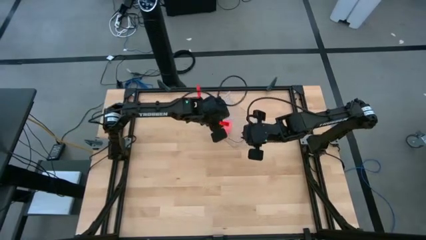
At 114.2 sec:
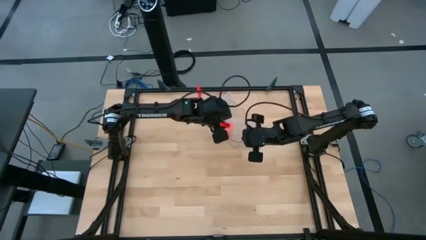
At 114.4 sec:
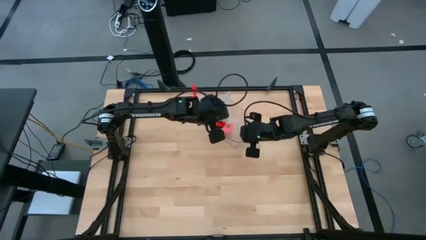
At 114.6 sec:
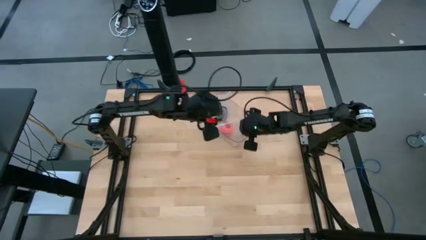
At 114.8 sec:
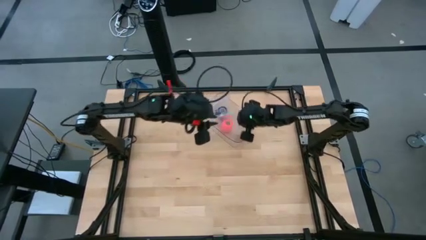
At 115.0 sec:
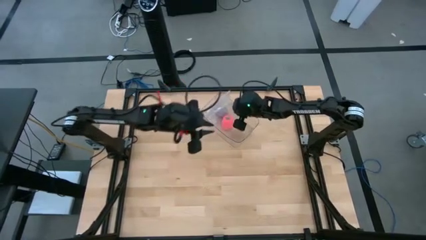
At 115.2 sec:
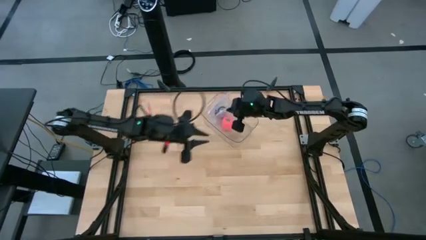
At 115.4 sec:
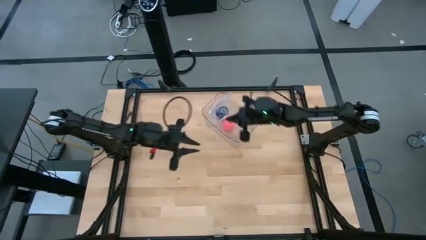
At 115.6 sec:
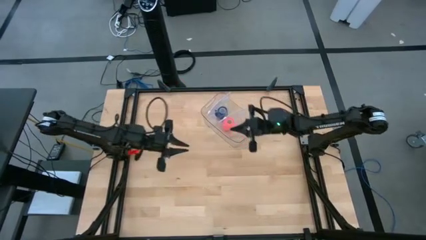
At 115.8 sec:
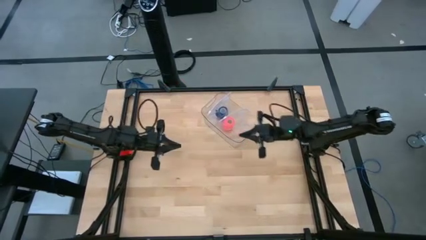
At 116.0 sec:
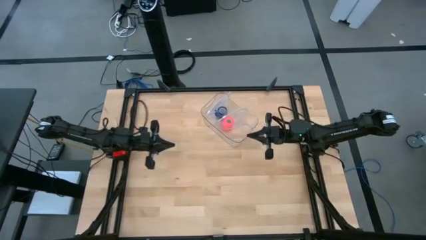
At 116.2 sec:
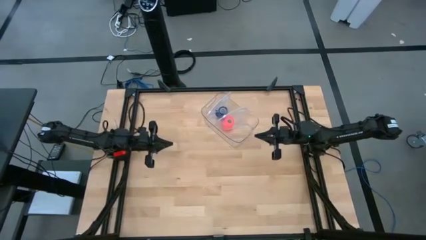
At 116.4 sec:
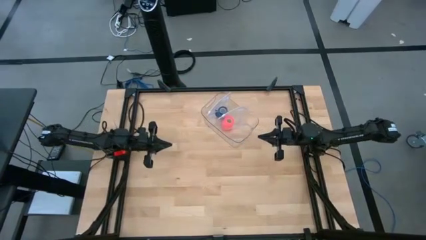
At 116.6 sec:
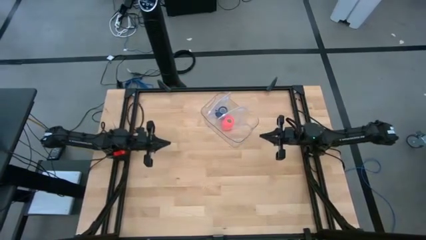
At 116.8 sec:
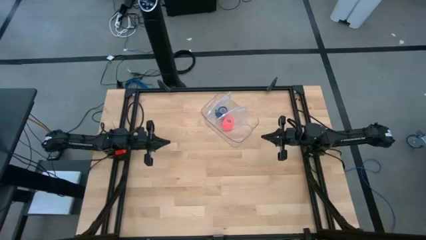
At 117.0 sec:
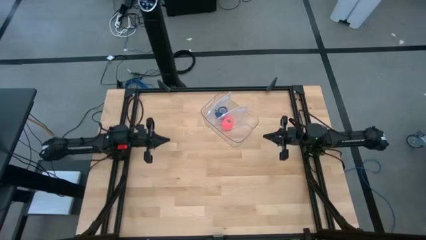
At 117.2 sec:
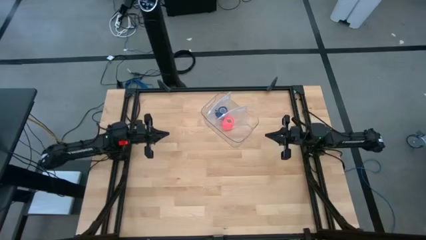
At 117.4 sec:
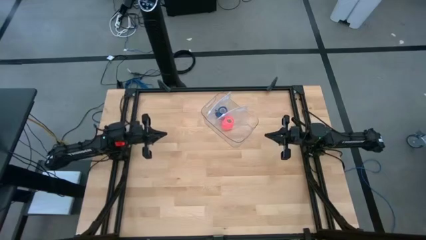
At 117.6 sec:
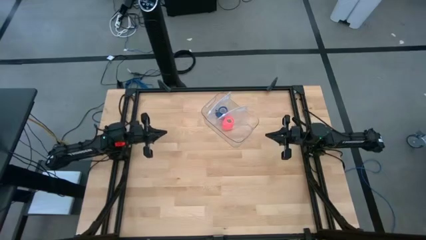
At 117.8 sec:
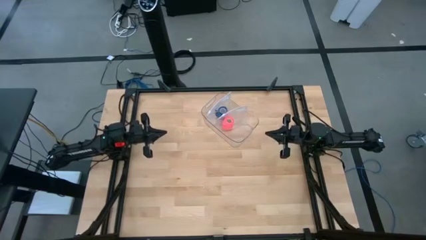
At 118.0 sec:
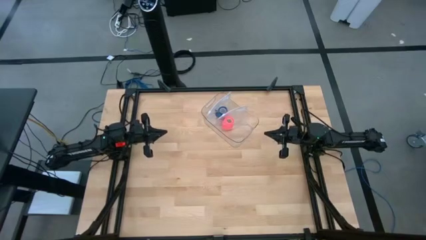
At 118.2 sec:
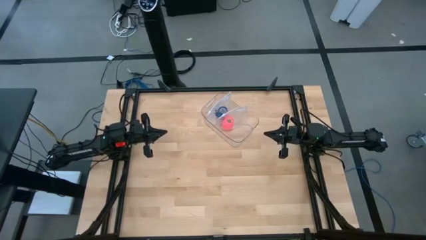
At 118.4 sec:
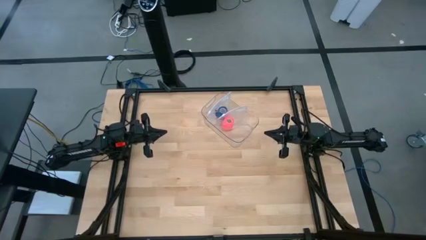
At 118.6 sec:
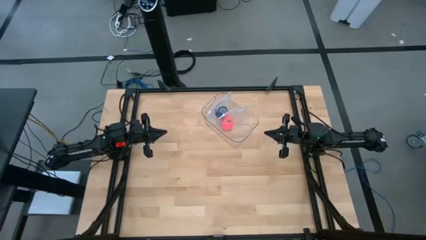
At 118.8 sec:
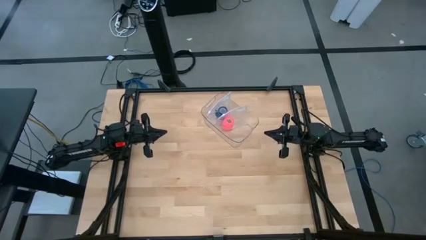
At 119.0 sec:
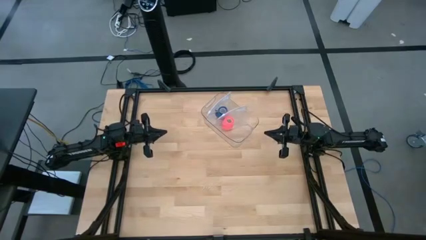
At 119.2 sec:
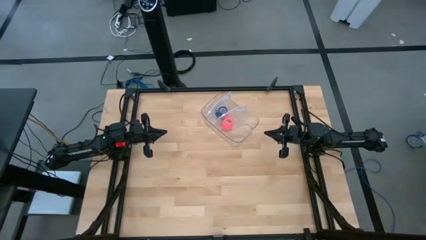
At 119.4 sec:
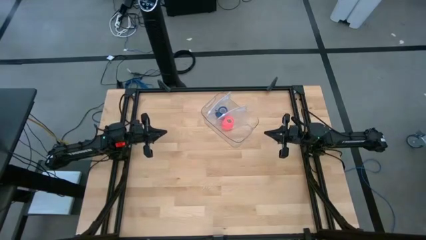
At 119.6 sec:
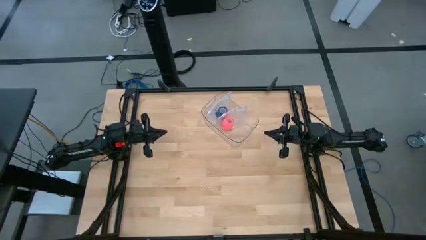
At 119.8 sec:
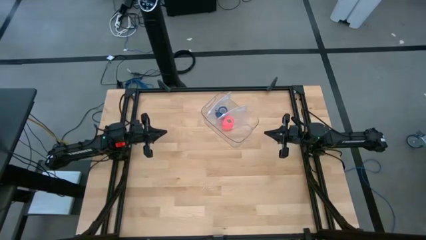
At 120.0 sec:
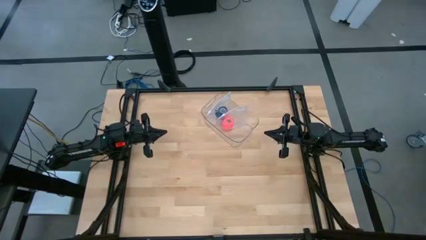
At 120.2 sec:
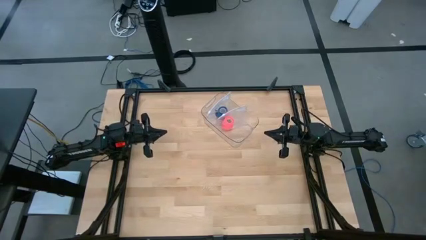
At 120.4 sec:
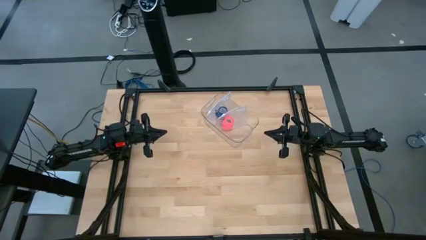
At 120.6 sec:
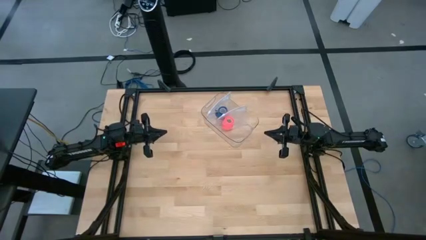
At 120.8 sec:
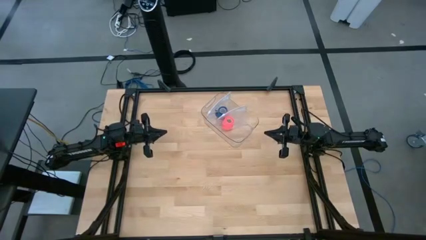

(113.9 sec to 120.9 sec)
Task: Roll bandage
Return to Home Position

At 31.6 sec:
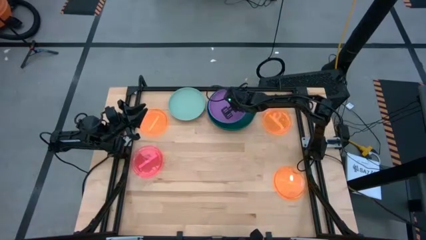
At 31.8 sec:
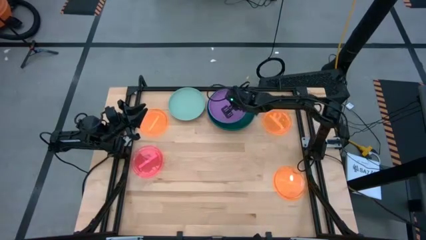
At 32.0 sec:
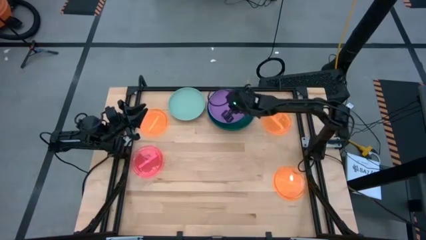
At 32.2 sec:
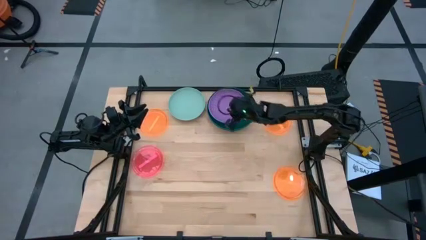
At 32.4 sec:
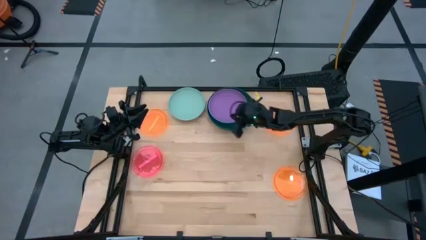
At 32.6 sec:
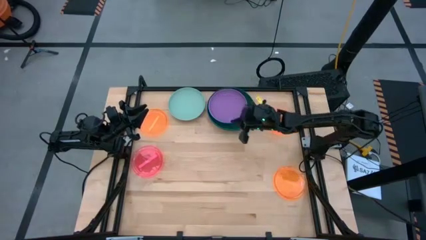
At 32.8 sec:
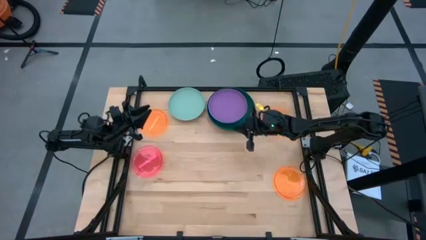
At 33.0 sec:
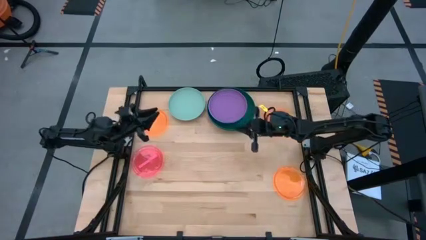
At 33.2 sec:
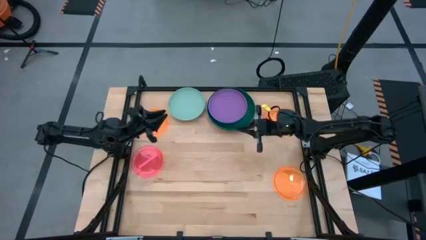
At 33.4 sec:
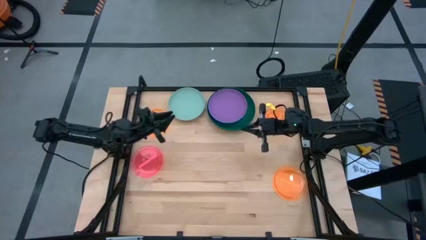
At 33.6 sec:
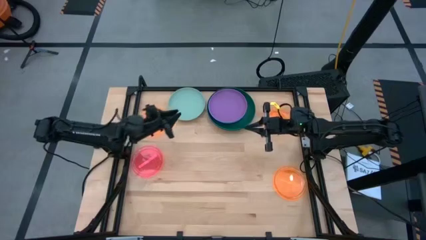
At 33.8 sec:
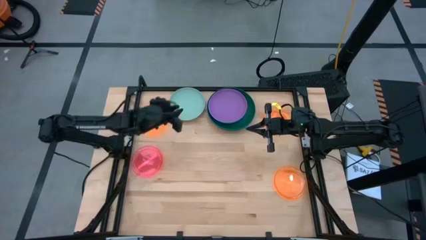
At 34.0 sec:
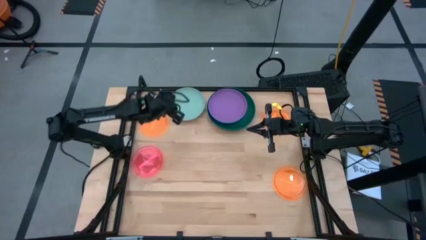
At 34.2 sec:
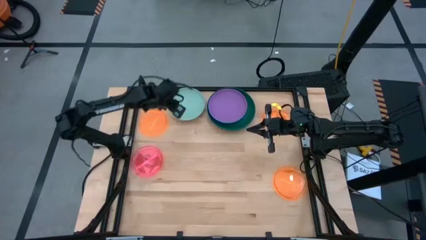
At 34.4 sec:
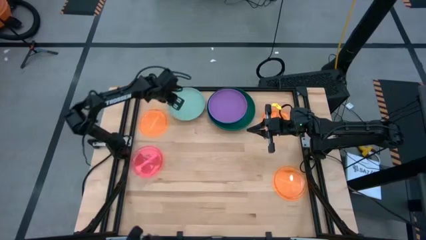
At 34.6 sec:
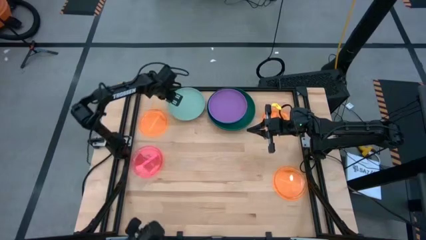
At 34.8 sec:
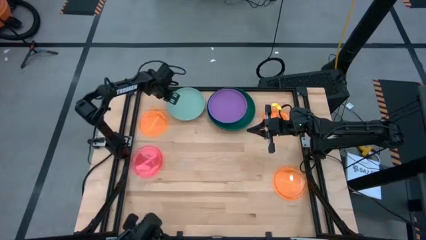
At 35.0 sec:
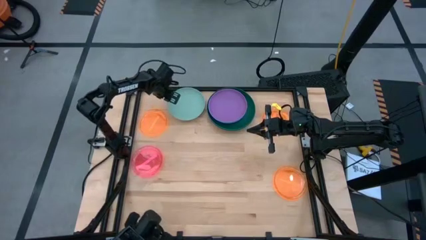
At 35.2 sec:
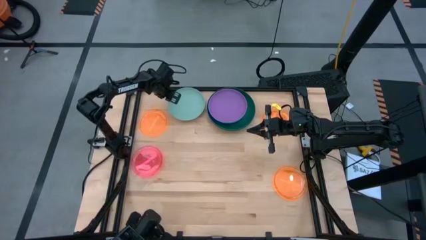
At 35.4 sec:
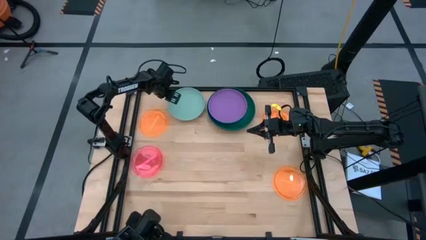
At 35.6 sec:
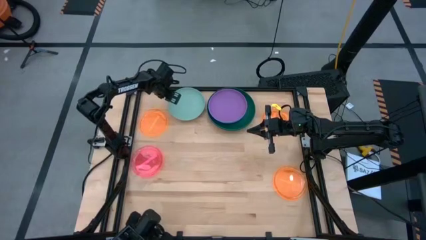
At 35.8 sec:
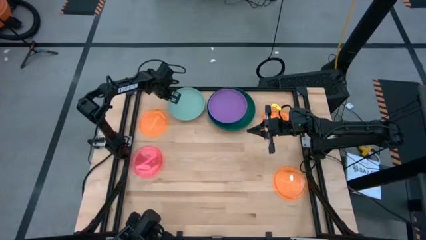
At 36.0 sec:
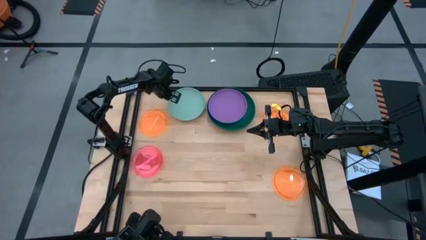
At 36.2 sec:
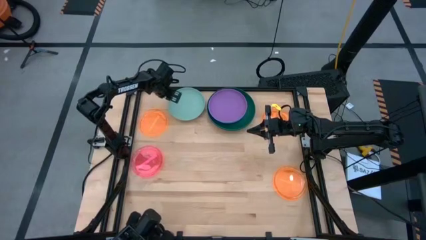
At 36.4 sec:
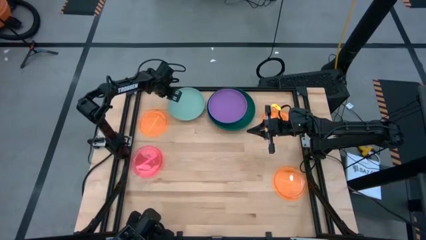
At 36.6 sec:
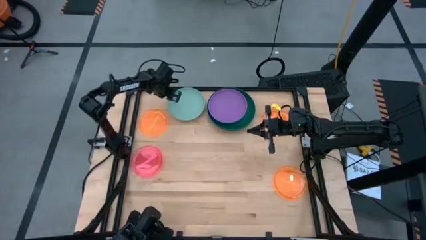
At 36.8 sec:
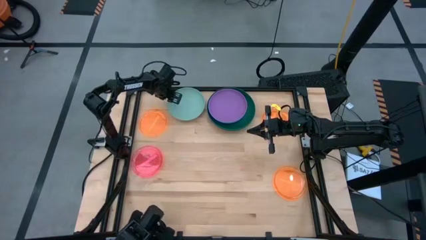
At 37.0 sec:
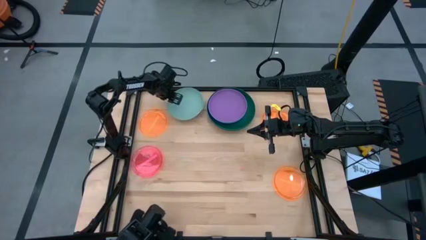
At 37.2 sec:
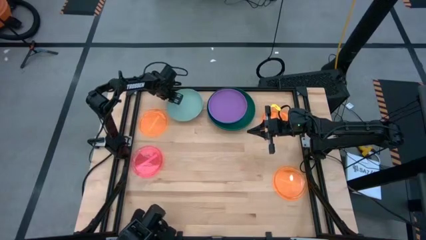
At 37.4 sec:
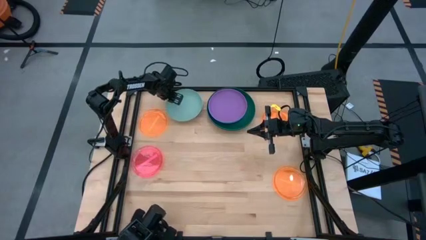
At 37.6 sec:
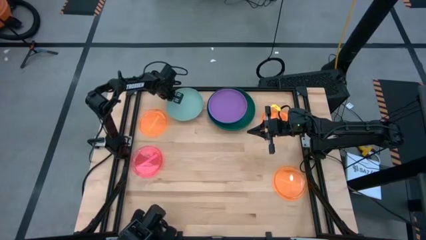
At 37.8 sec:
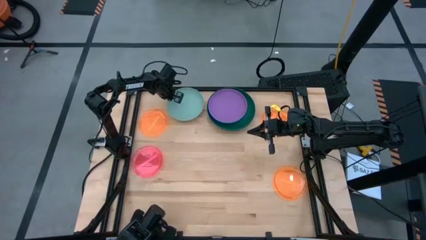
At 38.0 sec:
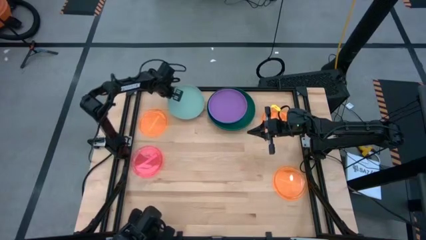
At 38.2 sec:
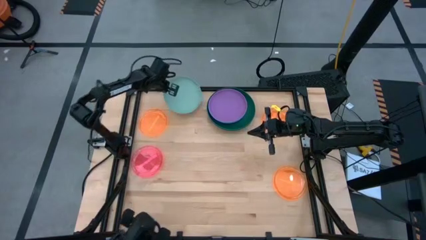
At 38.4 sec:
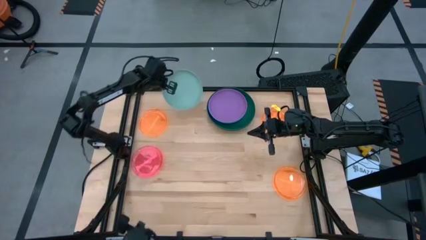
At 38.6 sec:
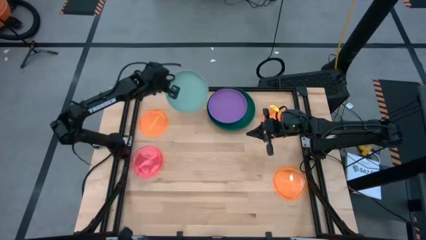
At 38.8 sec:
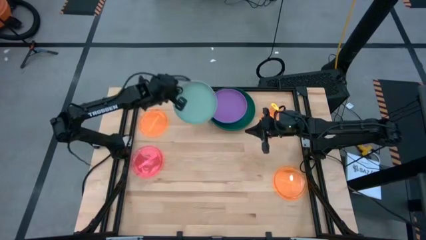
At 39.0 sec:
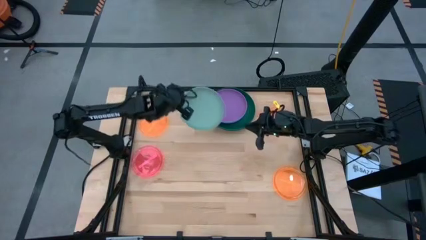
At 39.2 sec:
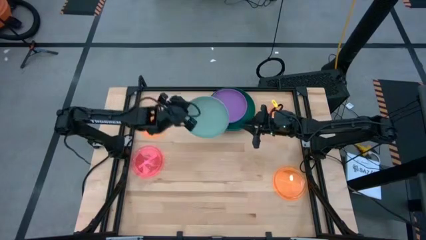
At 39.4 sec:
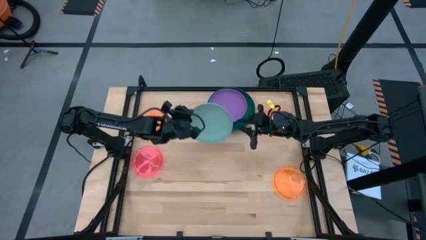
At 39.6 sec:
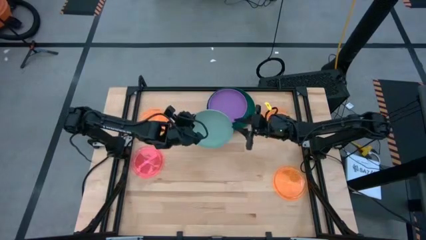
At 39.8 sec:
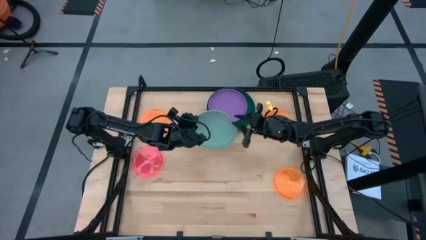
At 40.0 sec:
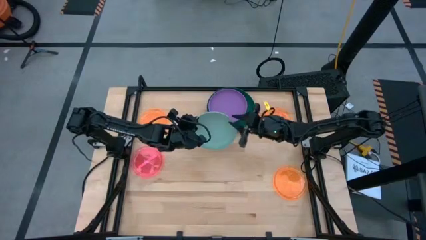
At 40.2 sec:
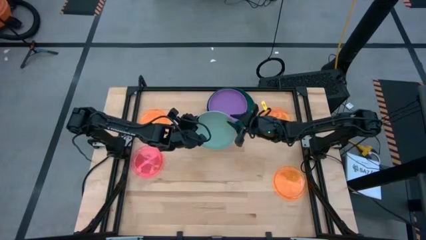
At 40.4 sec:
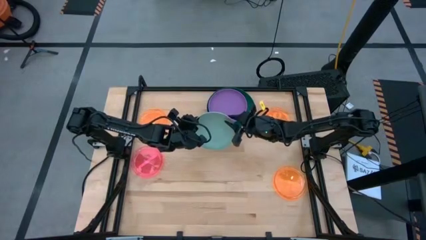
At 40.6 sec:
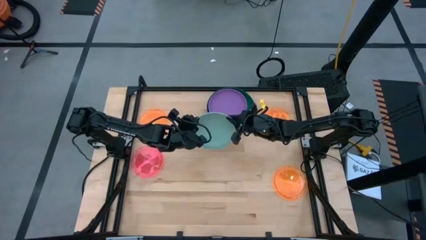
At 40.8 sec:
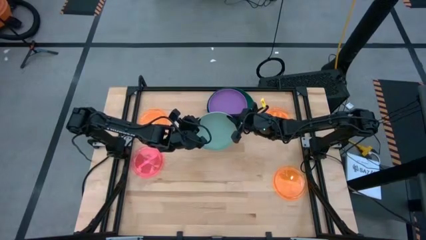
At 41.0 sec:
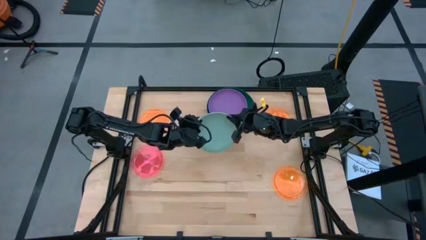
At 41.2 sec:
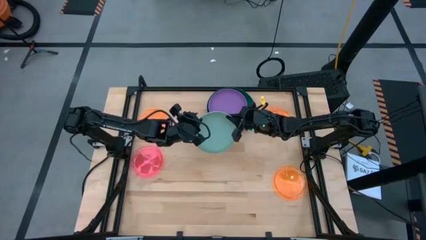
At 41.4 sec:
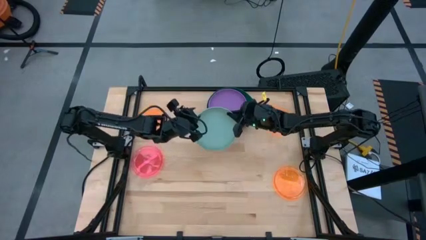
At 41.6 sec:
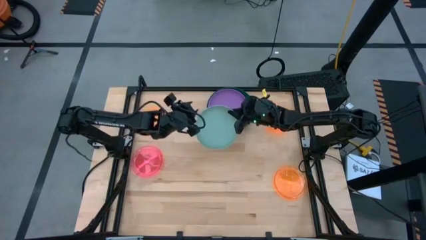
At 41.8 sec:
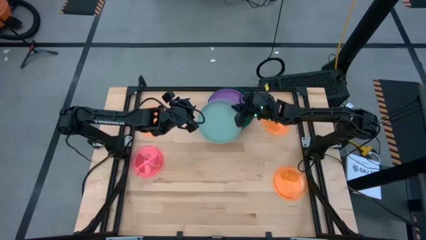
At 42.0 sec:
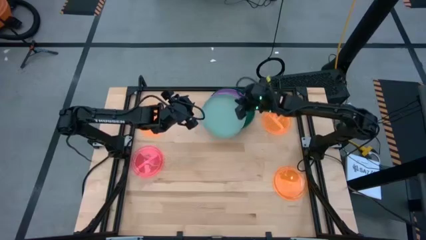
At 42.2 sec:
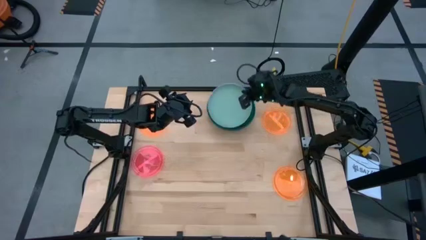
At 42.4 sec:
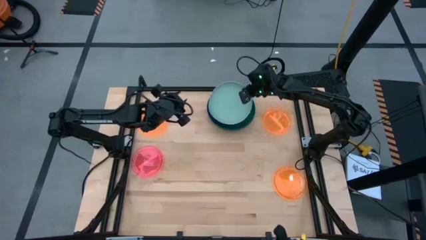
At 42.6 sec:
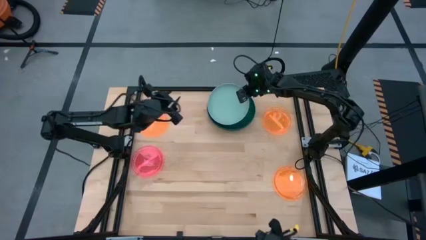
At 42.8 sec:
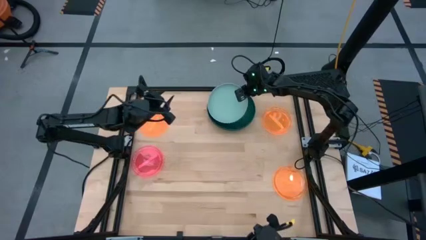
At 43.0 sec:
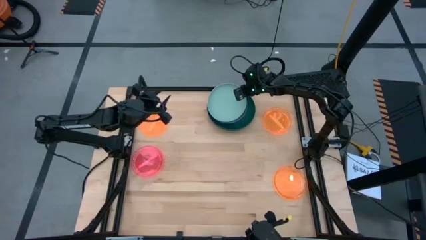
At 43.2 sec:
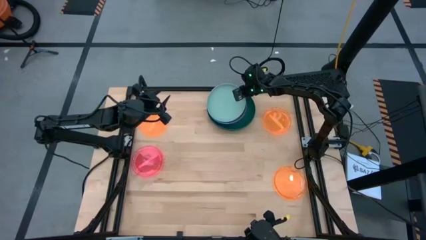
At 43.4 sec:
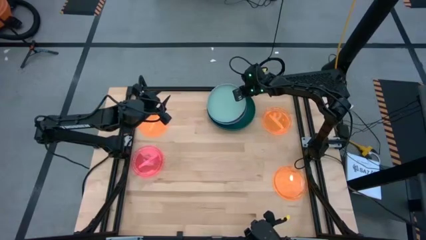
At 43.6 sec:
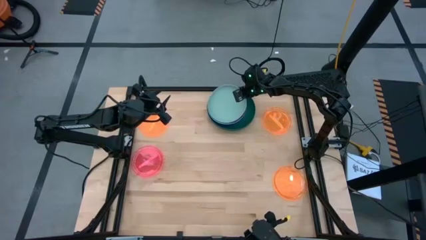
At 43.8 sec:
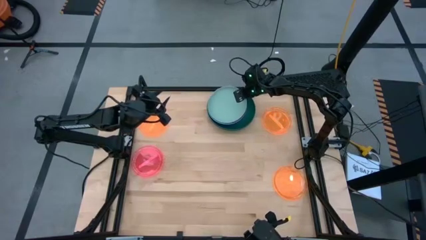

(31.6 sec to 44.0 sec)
Task: Stack plastic plates
Stack the light blue plate on the violet plate
